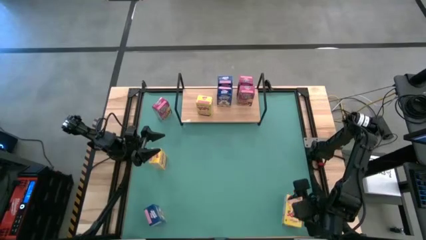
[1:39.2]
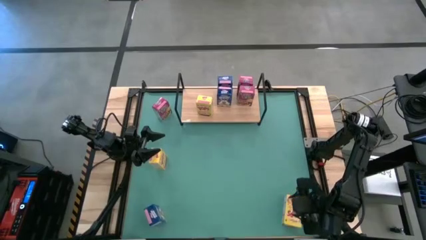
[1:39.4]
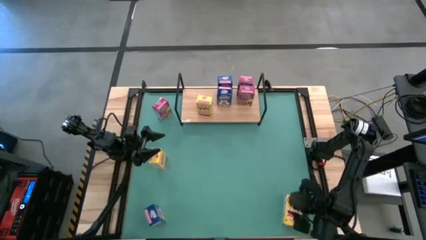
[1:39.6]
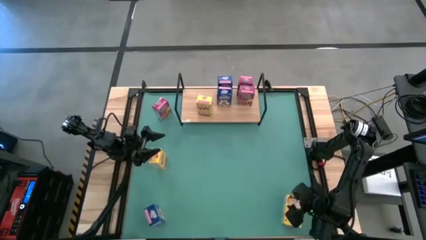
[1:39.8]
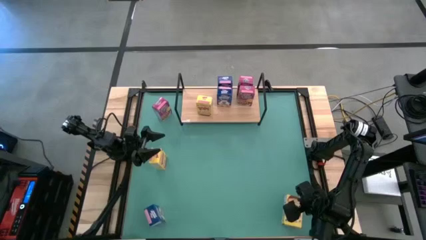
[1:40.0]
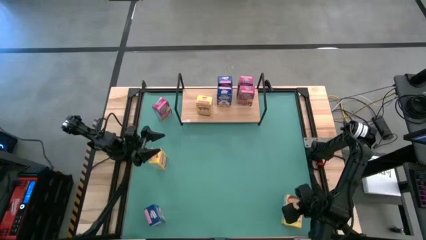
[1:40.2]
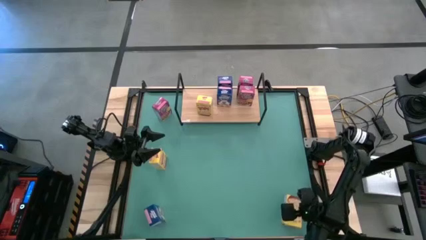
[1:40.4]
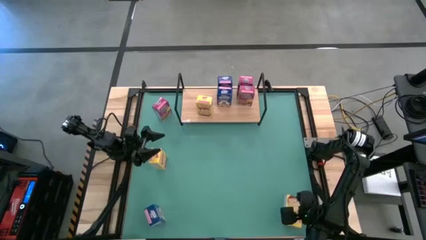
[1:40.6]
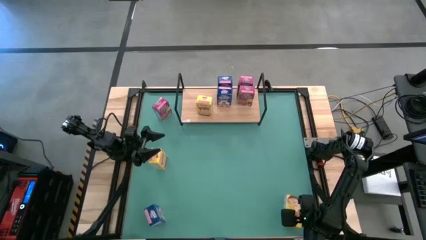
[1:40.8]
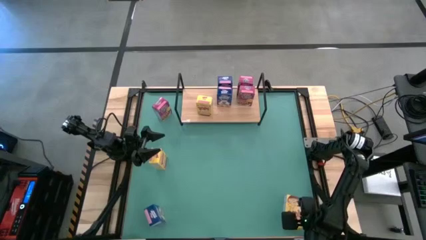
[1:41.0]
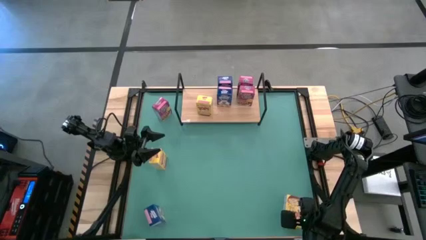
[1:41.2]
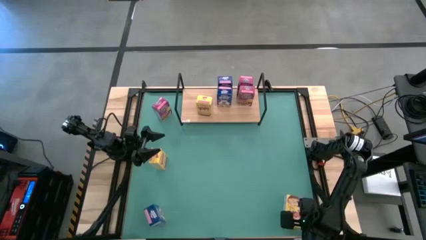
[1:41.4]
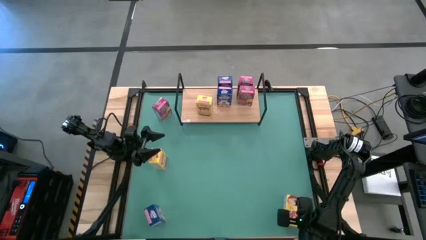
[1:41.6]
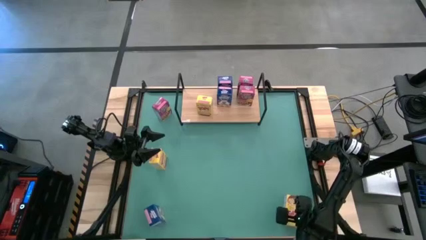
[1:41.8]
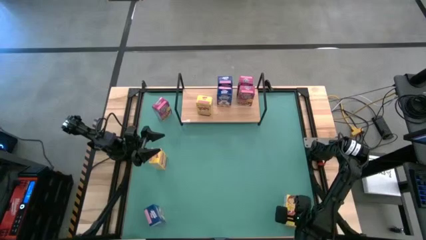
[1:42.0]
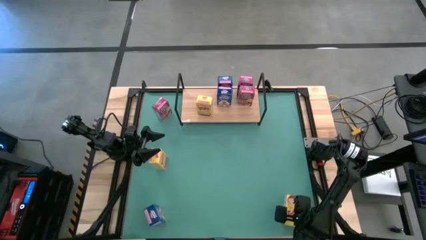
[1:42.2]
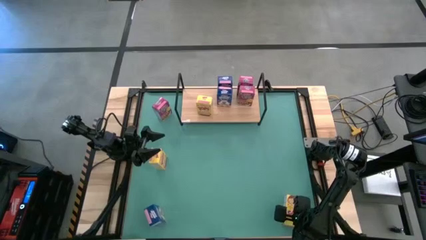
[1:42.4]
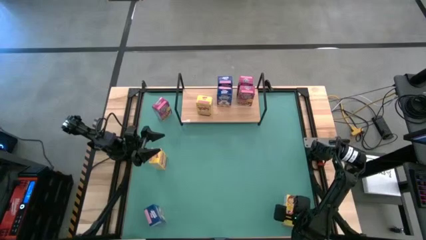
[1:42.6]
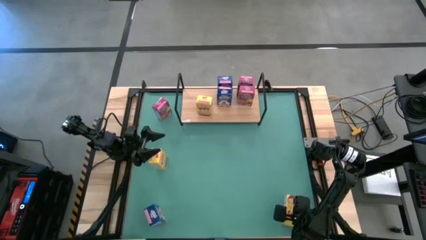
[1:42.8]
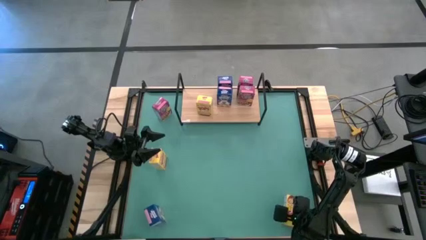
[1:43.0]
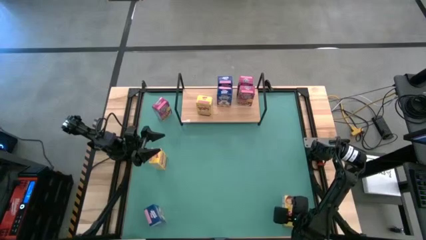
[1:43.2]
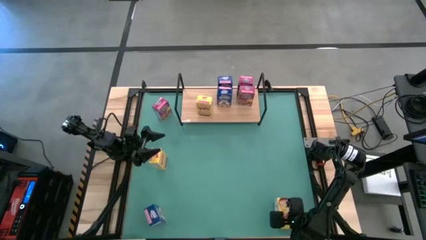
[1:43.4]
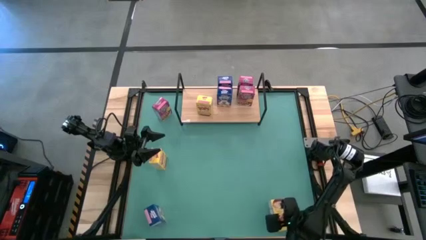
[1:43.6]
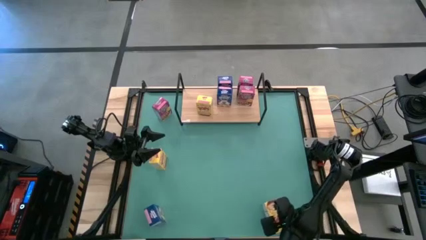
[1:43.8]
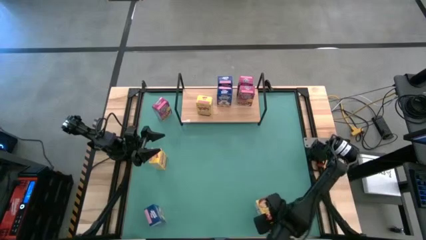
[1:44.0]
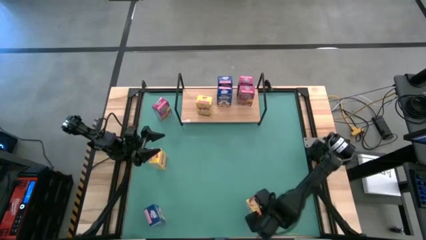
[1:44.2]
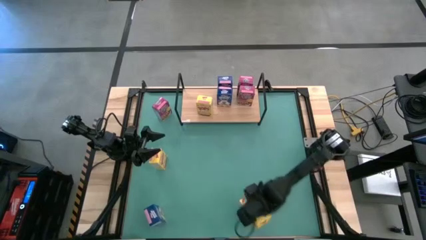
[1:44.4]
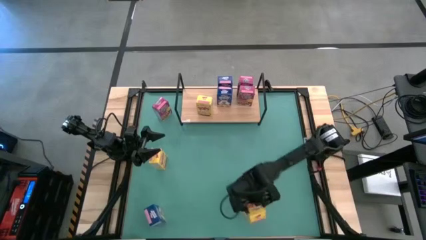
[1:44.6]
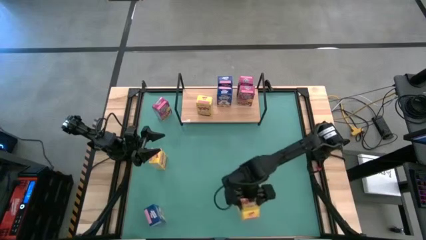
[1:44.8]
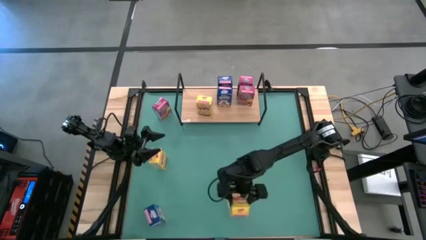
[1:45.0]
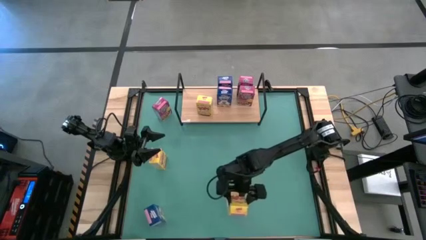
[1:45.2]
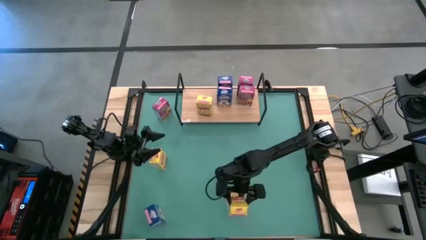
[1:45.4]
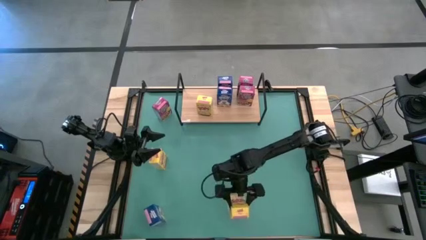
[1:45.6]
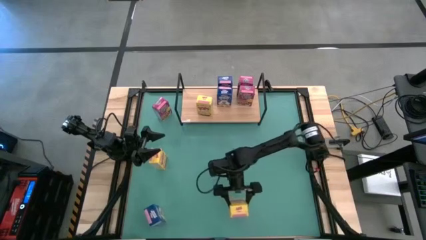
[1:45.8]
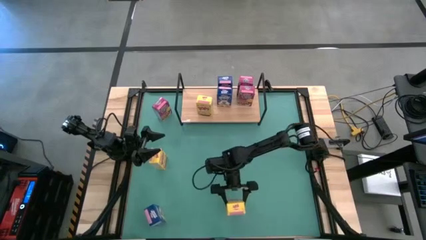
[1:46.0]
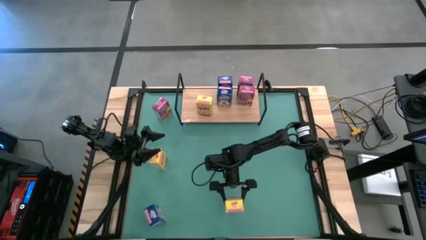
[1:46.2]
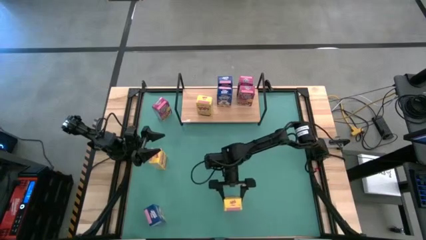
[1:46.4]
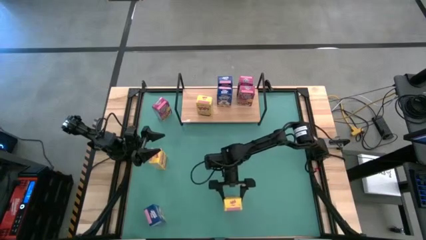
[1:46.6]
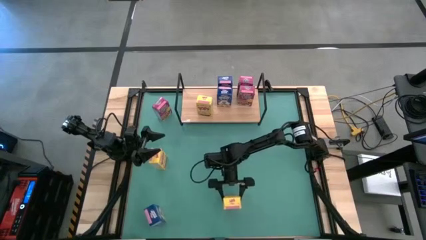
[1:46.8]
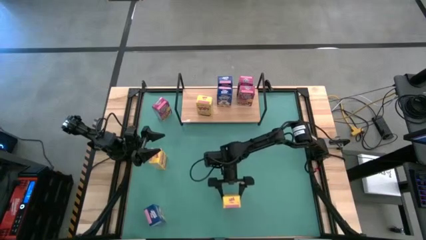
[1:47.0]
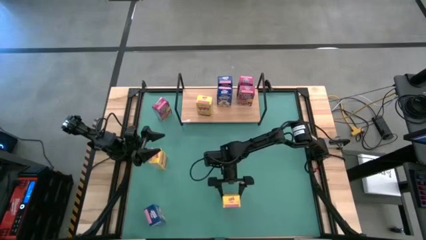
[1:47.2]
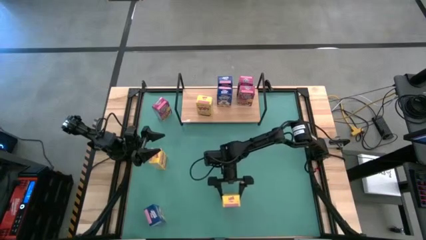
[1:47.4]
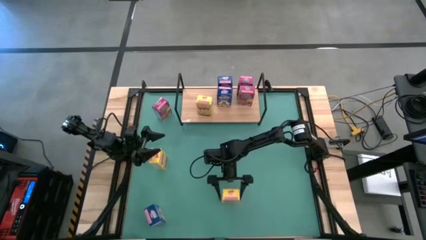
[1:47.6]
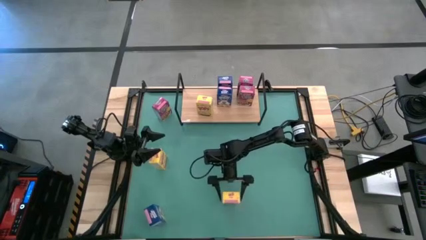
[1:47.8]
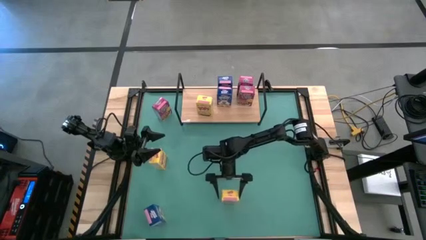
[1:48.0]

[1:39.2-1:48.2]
Task: Stack cereal on shelf
Adjust the right yellow cereal box

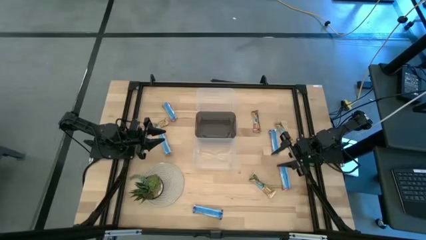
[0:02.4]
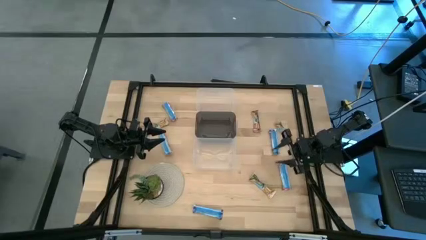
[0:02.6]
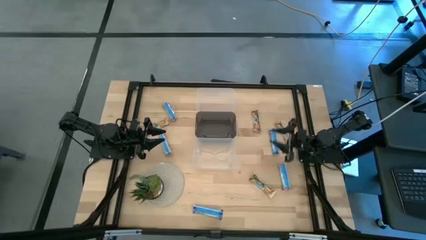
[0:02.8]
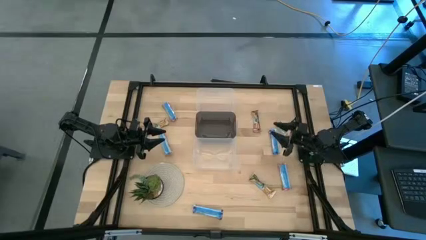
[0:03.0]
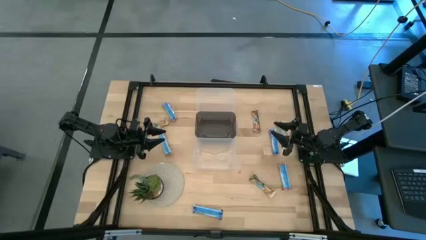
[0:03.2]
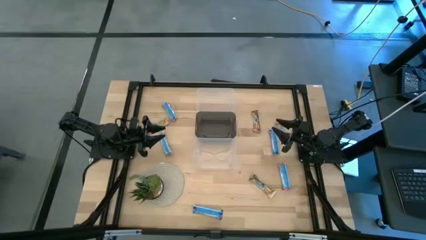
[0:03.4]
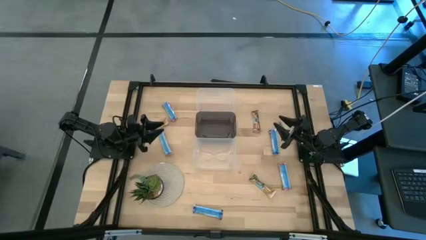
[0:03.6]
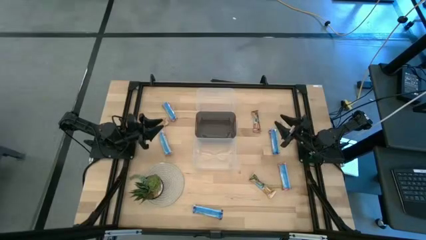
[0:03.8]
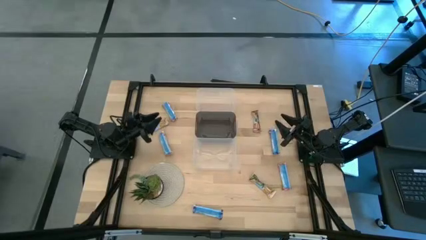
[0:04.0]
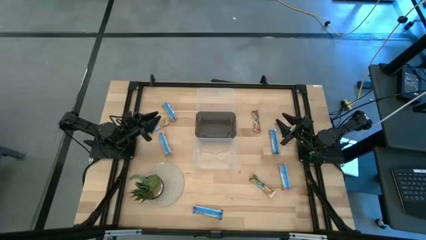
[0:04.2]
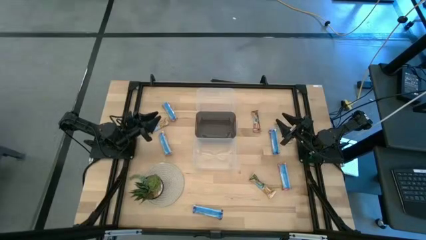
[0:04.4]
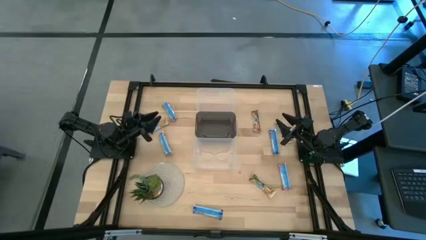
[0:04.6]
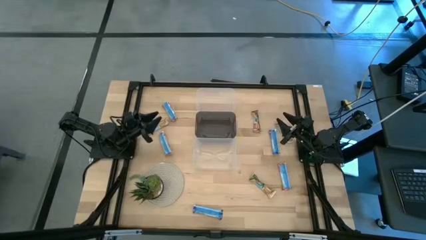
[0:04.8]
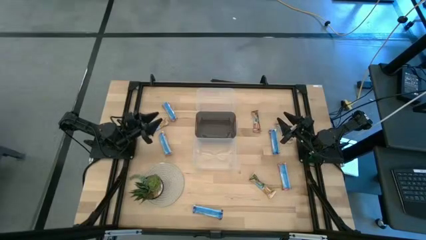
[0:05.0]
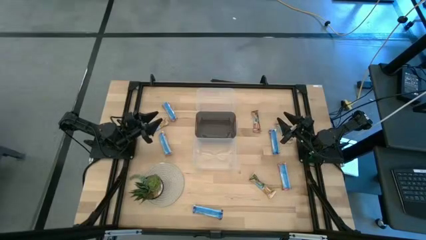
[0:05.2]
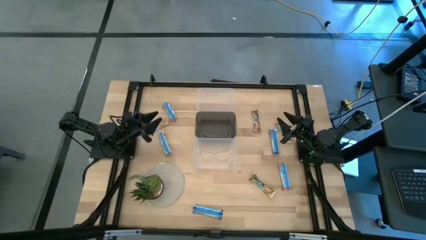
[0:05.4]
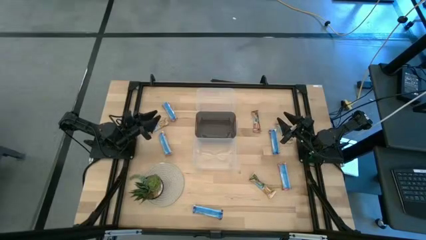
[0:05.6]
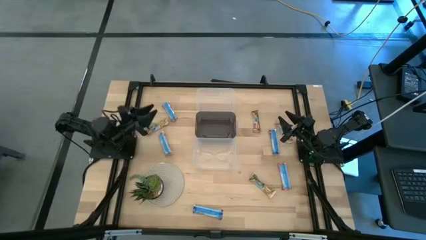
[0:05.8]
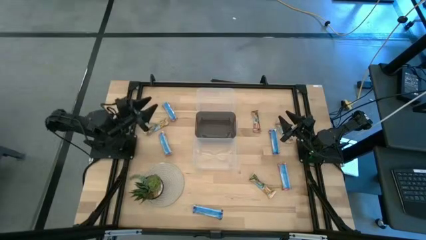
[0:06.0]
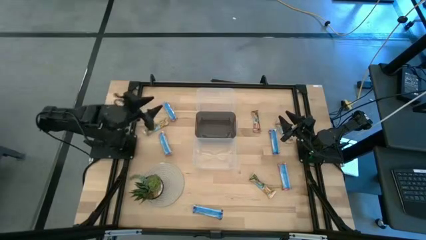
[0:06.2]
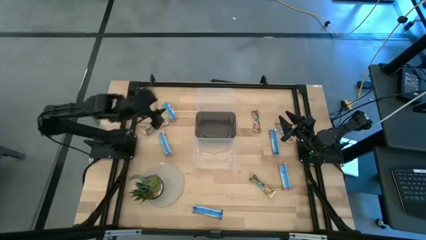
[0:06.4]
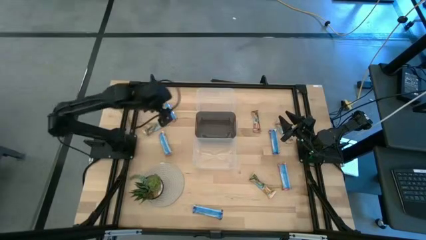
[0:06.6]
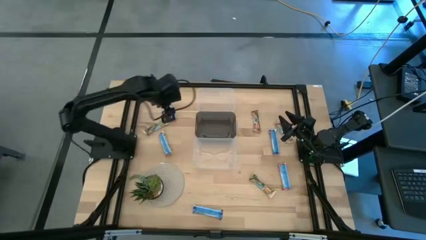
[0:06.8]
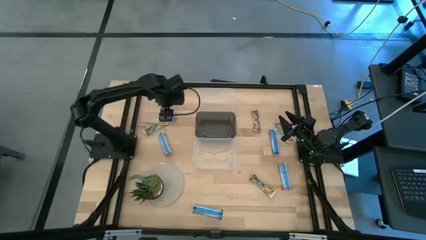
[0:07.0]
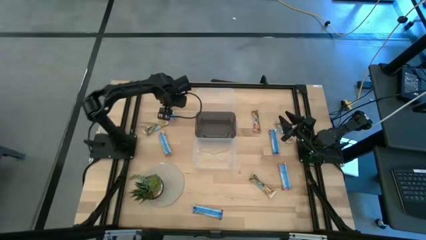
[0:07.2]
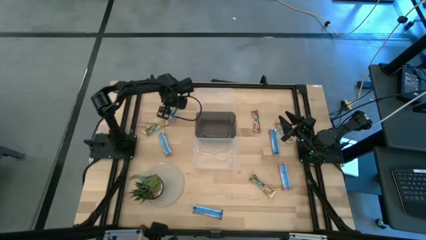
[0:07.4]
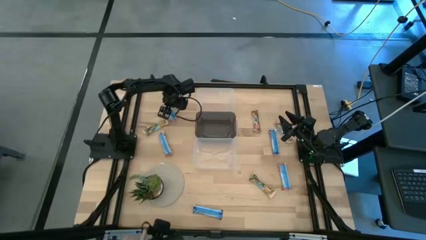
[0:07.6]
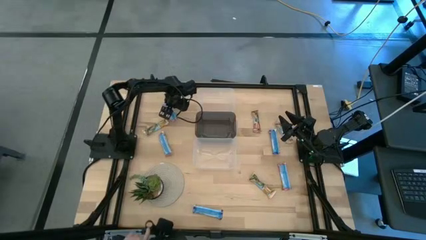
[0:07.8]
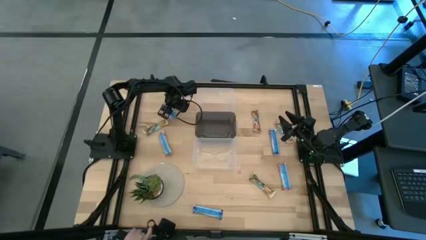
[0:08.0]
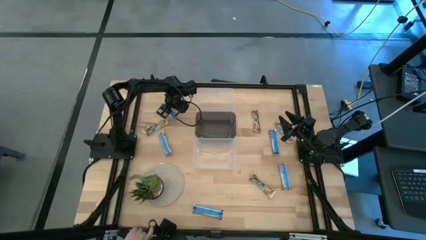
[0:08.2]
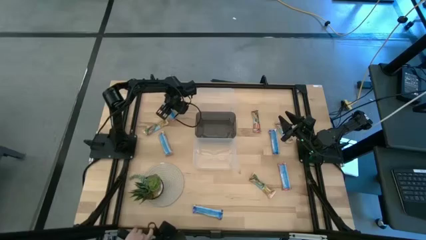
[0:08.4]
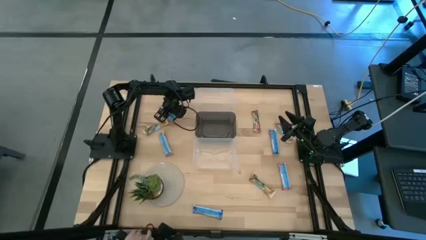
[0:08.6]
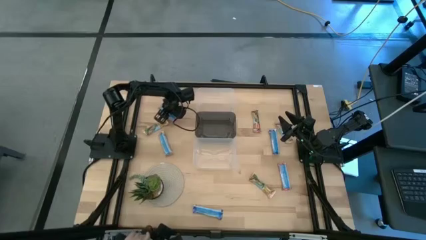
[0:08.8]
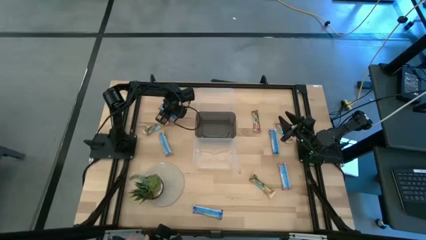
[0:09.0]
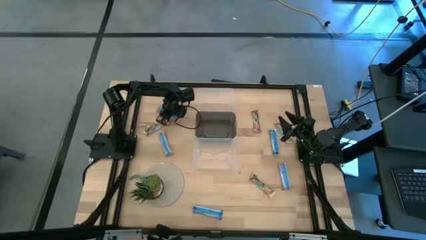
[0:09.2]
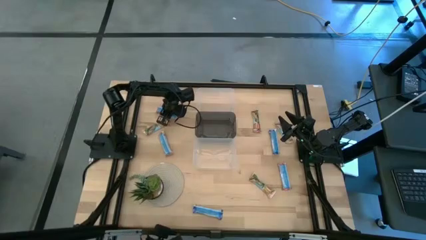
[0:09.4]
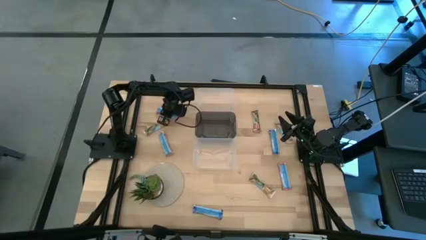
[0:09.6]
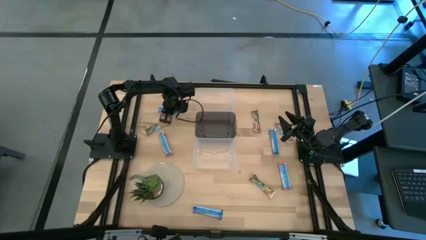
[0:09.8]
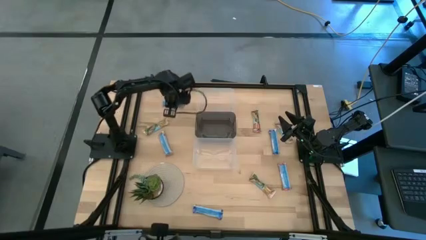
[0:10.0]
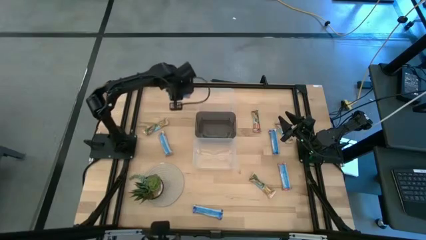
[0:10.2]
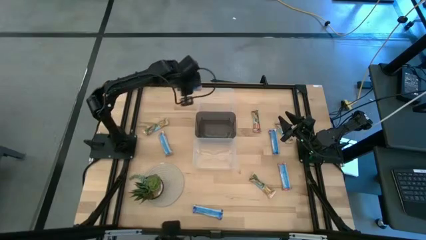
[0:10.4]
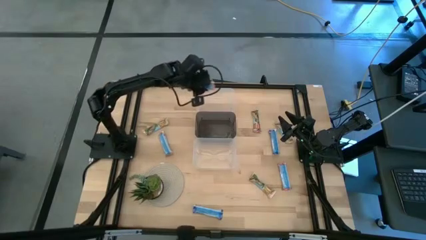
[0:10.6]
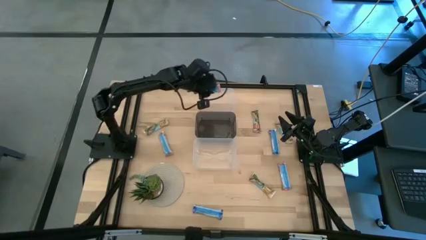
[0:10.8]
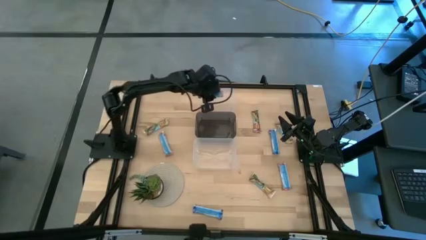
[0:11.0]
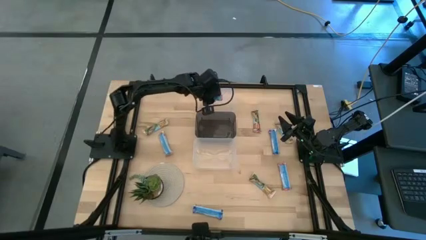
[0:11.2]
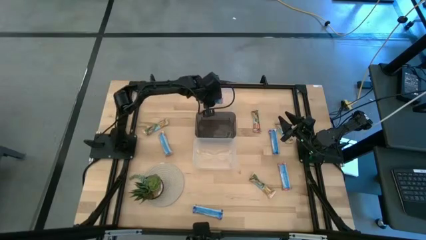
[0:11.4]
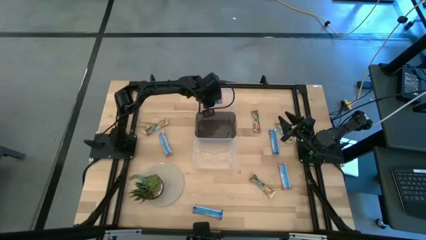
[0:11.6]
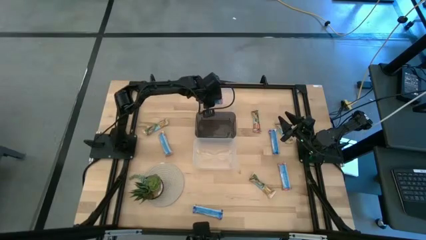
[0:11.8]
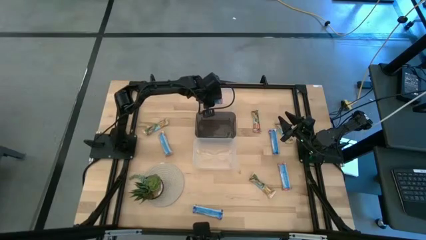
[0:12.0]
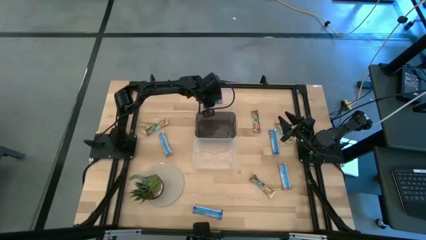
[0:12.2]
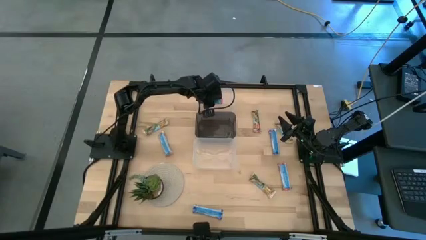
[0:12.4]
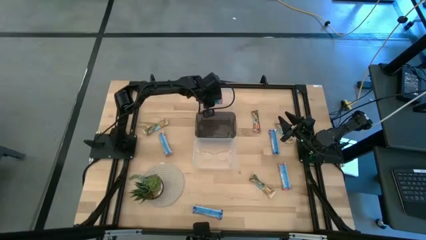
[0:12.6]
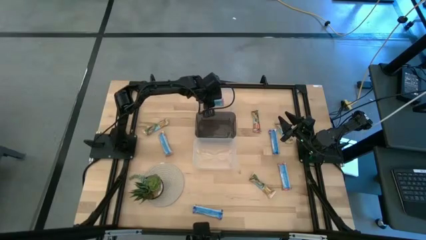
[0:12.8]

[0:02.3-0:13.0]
Task: Pick and place Granola Bars by type
Put the red granola bar into the top transparent bin
